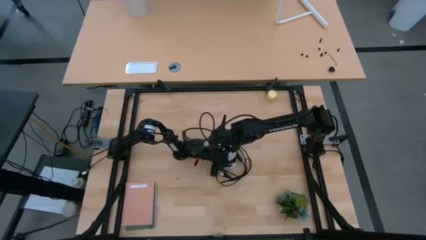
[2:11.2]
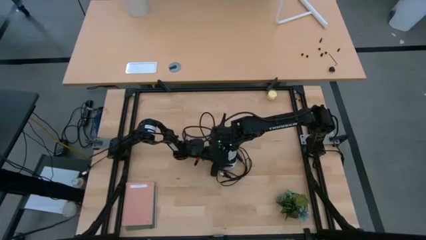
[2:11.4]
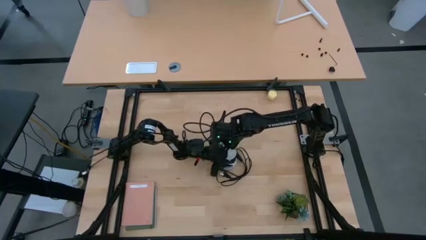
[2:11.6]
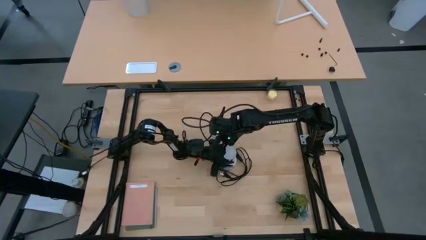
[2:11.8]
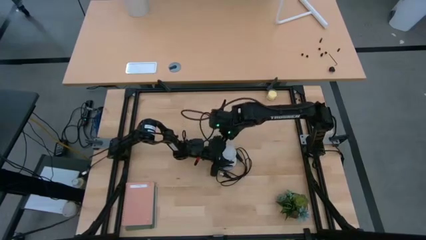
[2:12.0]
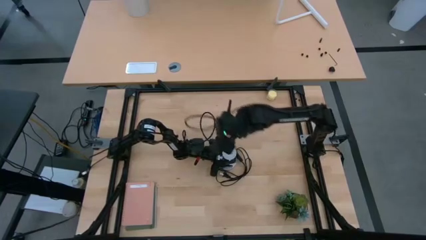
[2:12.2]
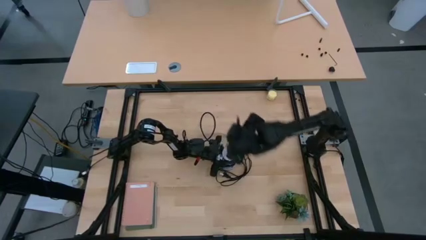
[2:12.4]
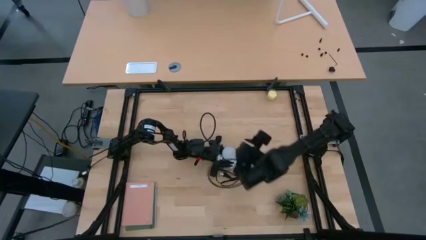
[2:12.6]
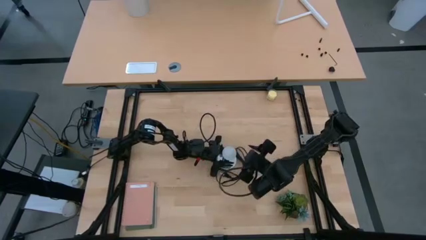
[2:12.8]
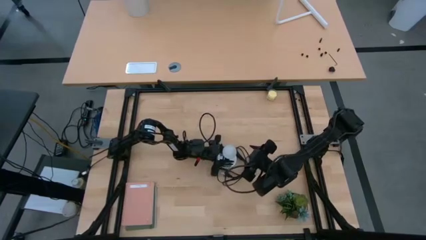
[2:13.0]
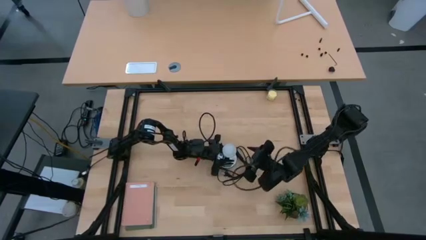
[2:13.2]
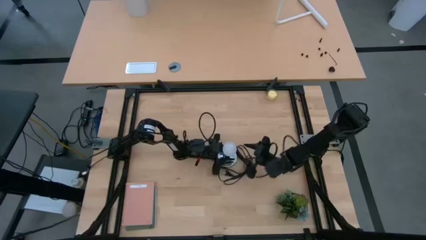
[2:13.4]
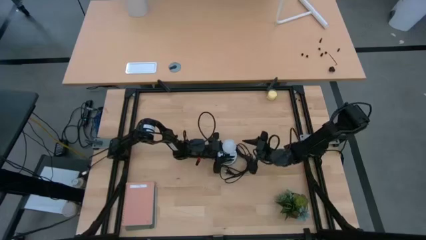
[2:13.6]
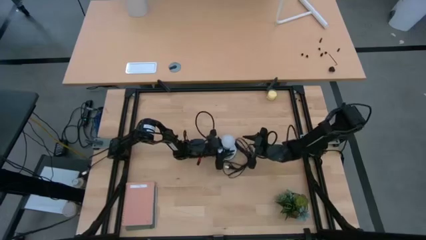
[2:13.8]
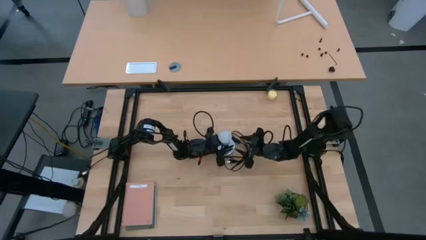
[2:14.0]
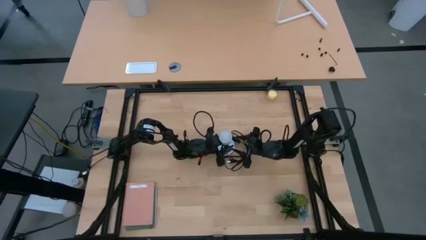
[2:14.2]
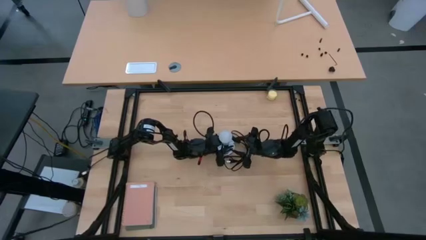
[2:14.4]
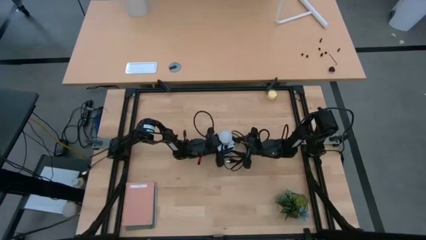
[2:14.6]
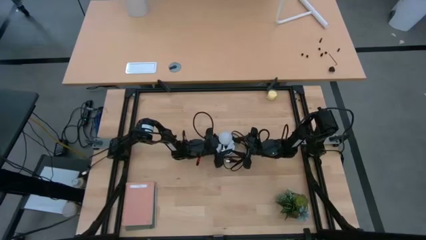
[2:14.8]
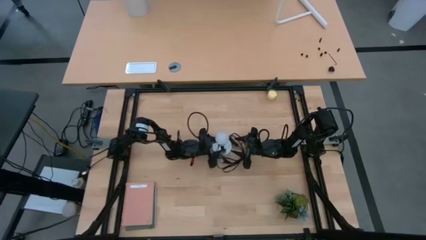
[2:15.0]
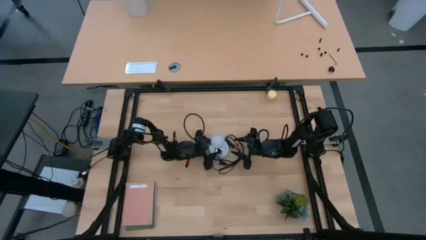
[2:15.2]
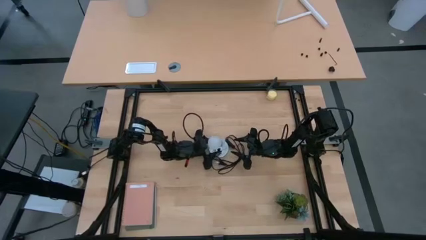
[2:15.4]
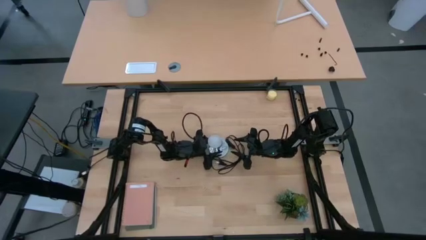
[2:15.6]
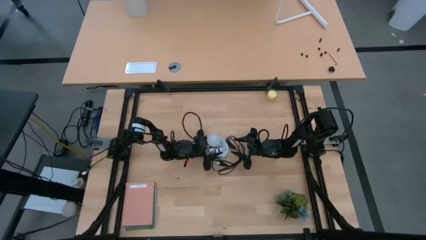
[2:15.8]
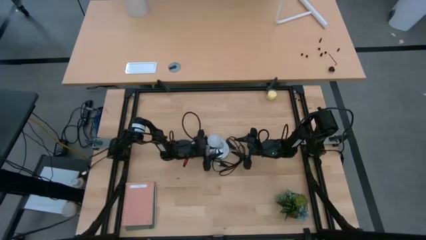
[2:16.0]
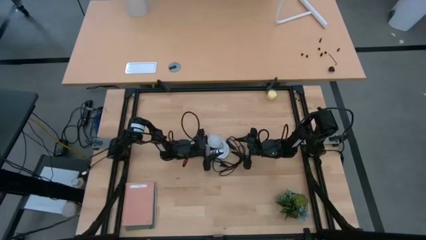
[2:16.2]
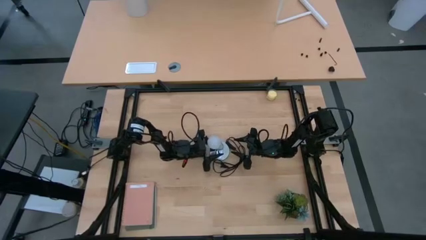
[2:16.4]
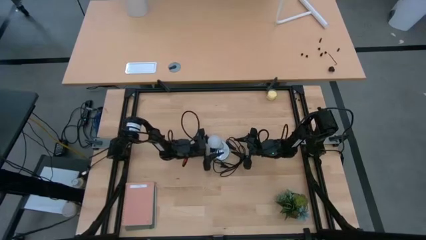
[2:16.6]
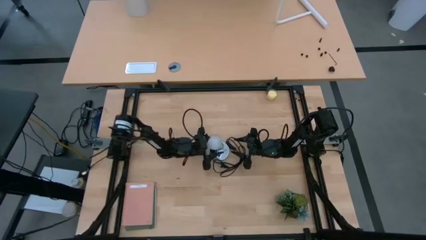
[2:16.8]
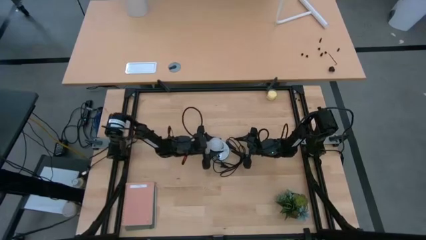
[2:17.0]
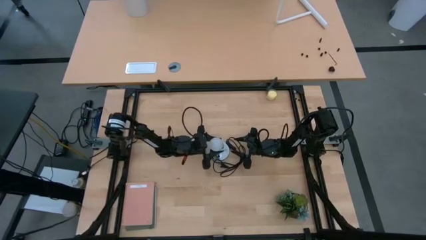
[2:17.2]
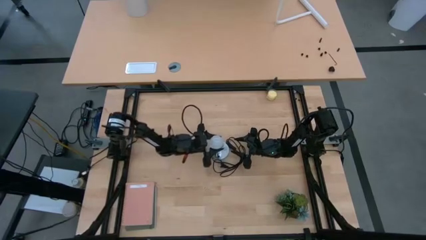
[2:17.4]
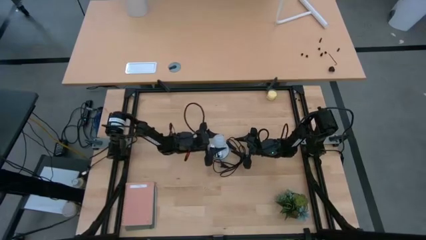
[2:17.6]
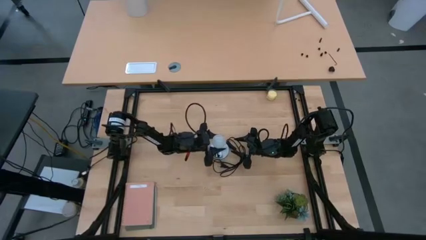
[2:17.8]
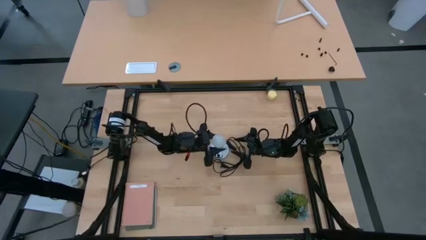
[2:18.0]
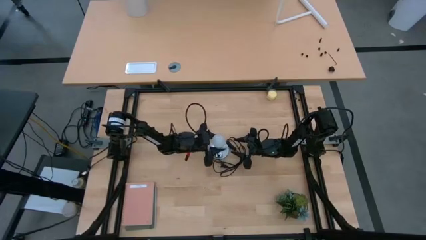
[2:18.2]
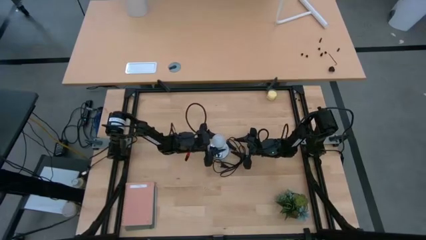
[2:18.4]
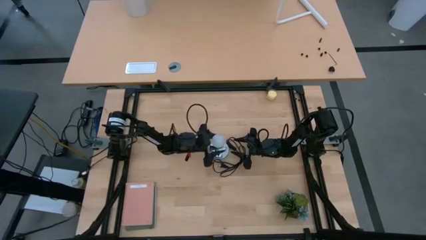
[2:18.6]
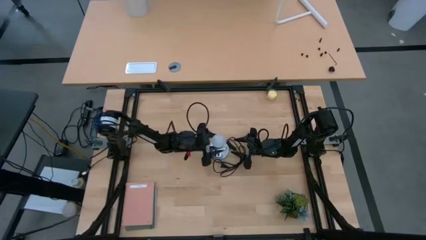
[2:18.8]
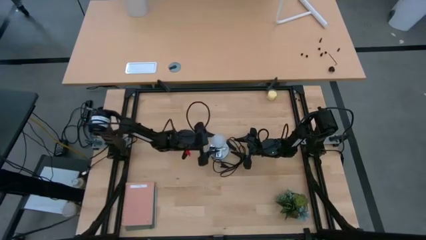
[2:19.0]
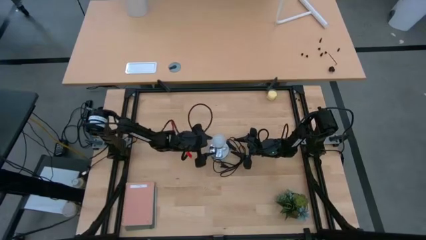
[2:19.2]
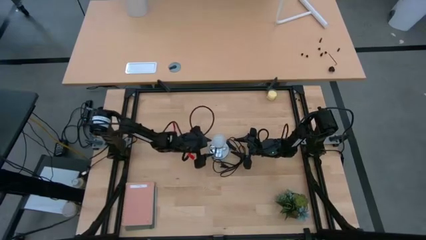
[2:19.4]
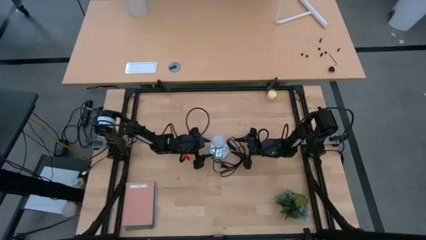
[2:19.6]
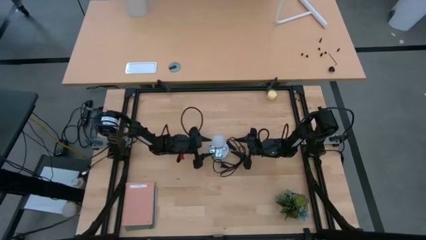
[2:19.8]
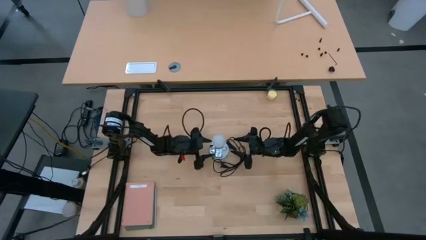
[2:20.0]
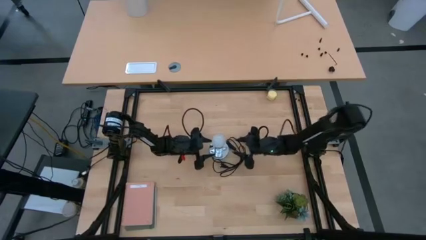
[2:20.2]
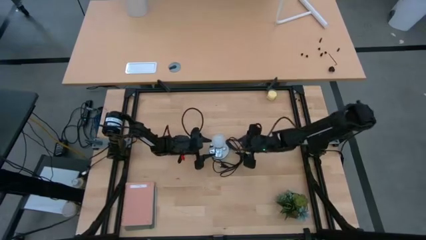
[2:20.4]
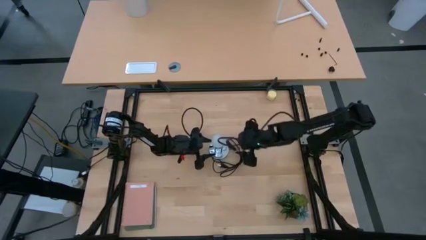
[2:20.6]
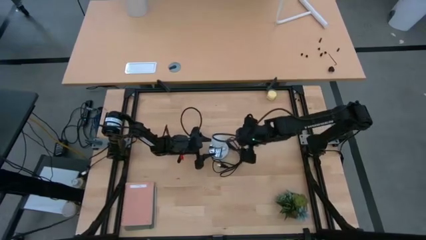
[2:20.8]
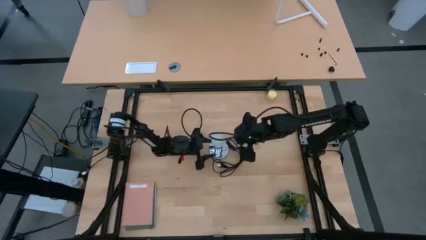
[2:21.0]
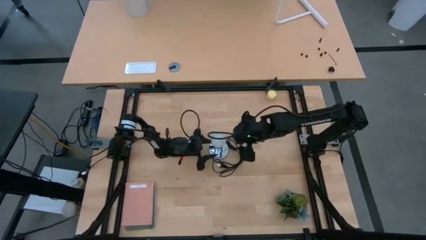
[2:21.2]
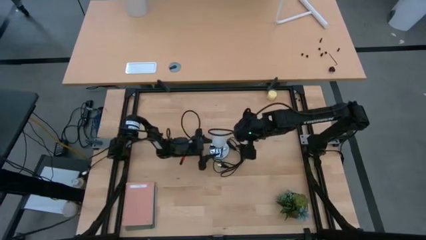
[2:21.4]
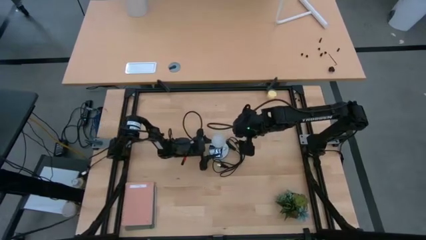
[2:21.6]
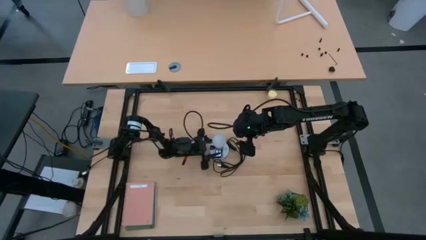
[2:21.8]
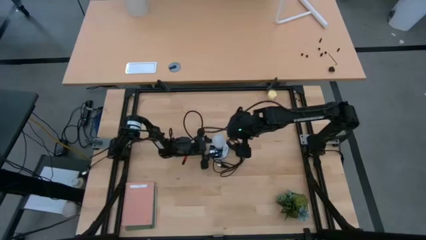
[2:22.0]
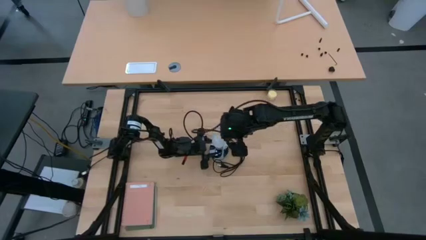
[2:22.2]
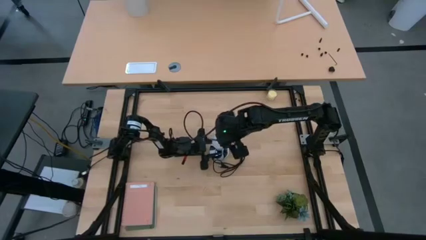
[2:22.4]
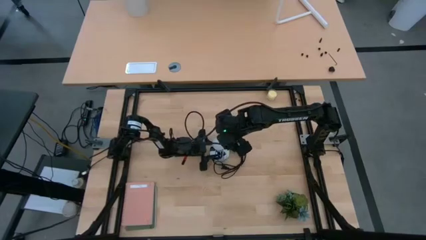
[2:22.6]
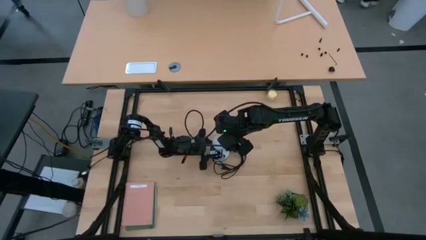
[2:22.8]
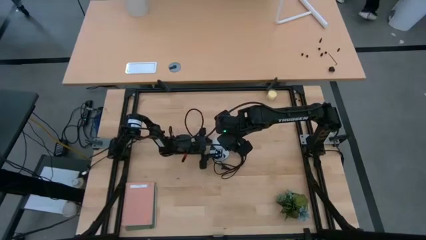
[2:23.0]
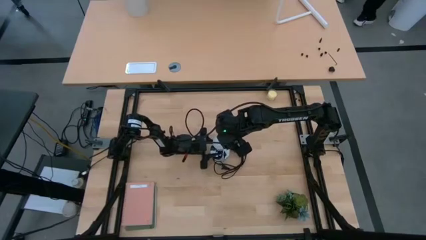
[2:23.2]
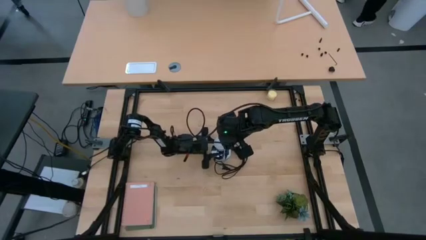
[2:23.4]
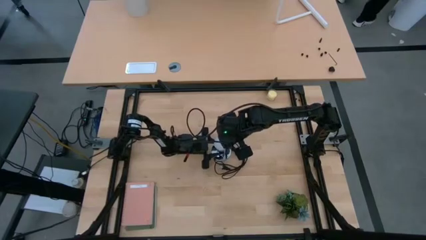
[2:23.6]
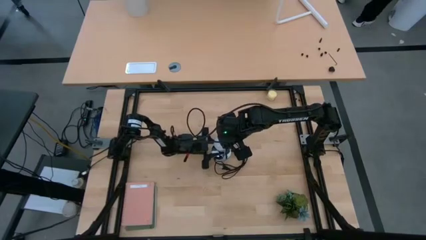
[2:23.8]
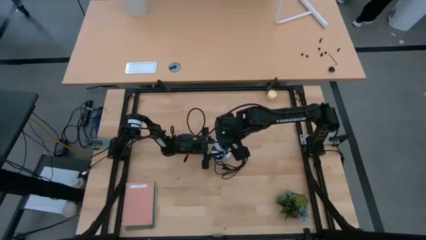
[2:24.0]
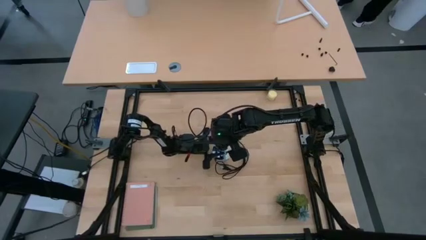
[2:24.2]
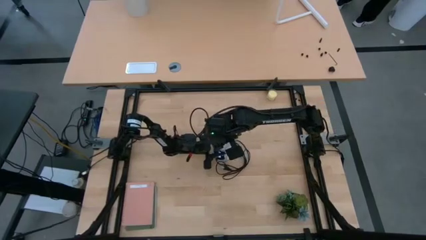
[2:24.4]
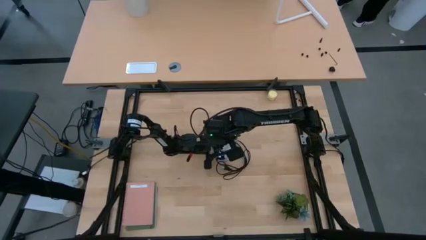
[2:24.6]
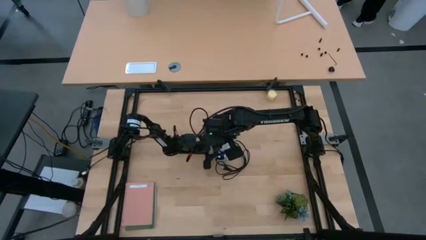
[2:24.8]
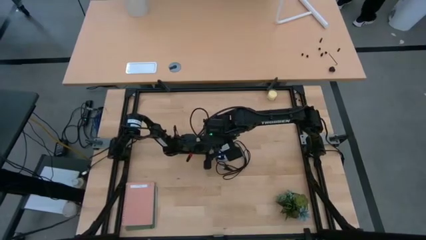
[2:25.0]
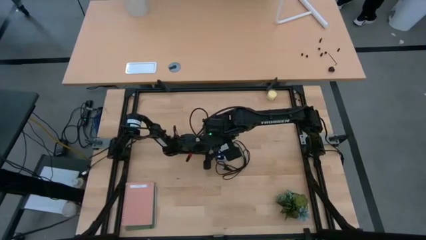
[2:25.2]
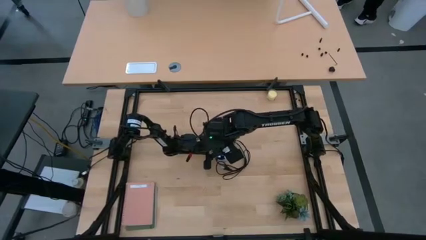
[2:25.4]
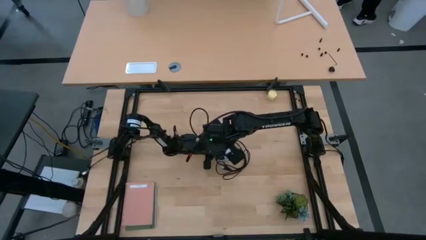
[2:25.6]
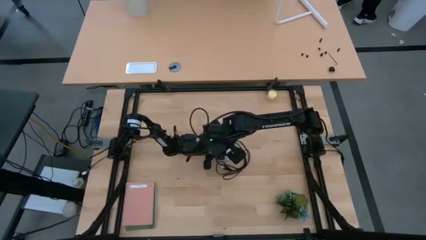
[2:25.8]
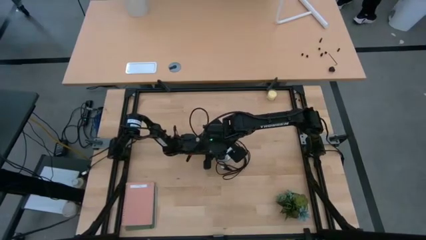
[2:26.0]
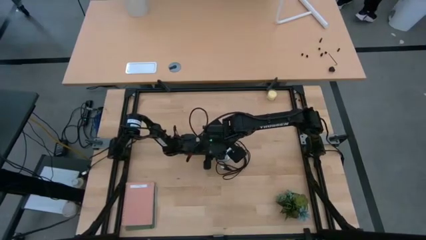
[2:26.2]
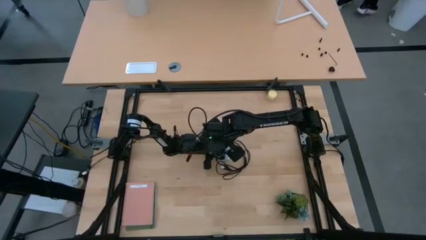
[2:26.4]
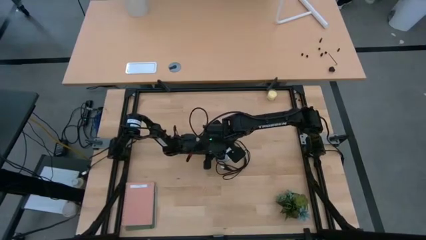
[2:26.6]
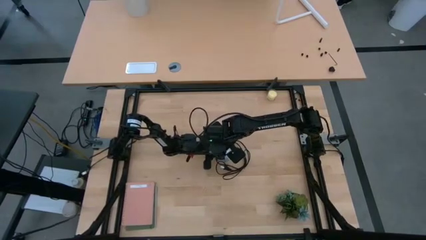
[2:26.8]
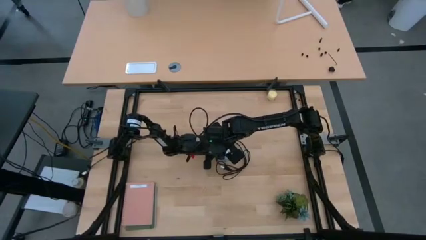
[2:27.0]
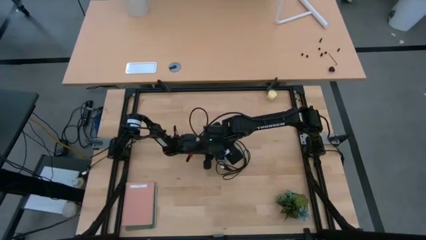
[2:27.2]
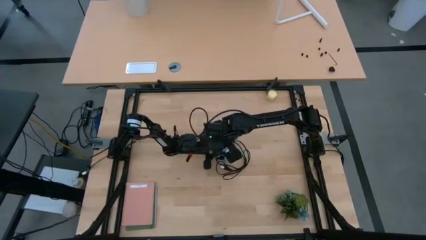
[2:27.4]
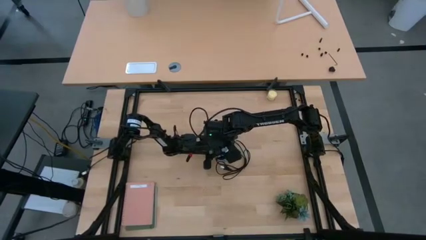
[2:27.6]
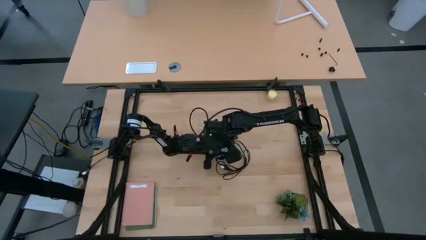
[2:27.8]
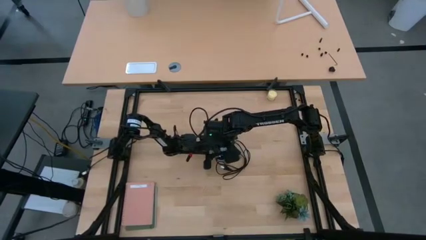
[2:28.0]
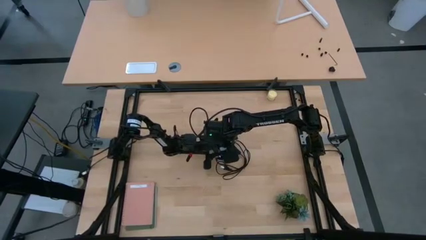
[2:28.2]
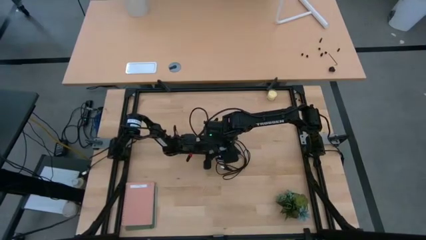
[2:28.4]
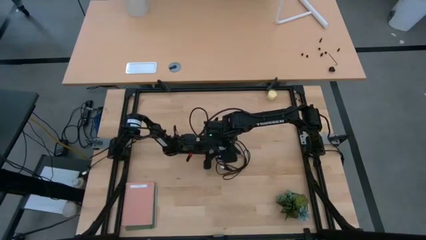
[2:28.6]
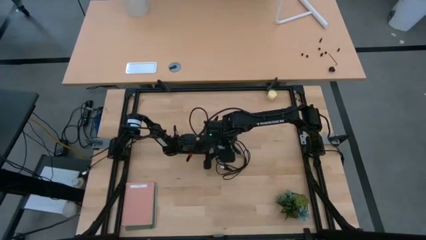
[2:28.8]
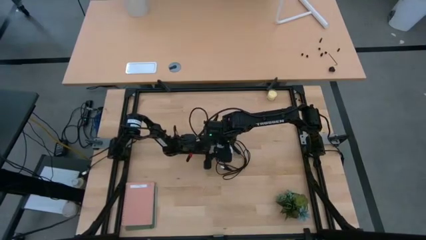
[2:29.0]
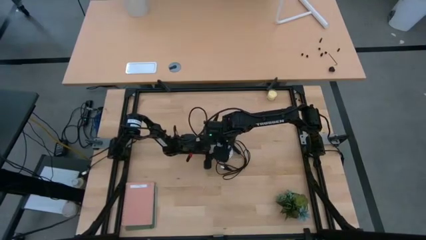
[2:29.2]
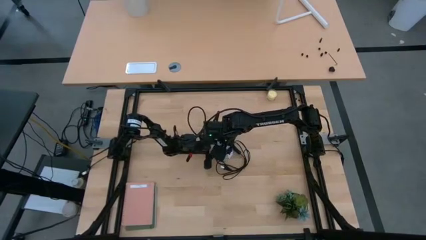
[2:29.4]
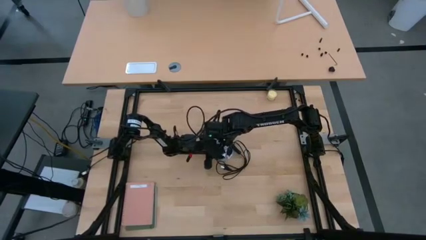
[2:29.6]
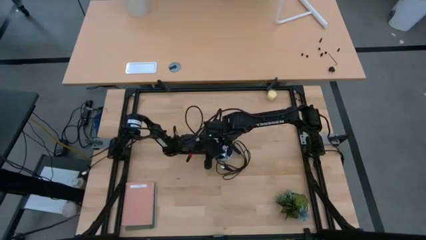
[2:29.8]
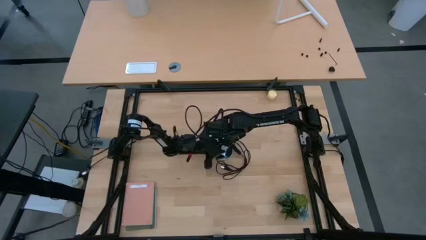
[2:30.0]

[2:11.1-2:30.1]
Task: Screw lightbulb
Insert the white lightbulb into the silver lamp
